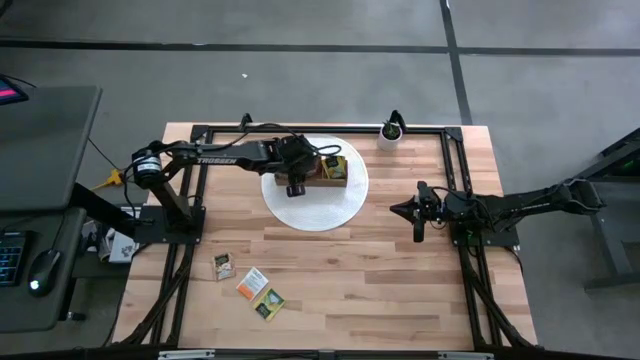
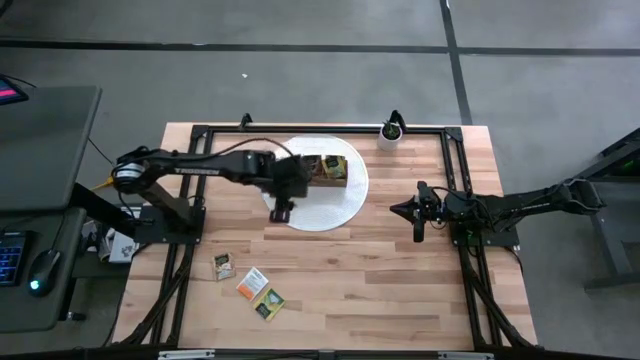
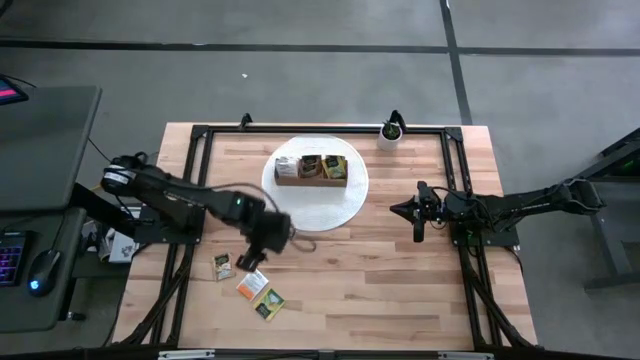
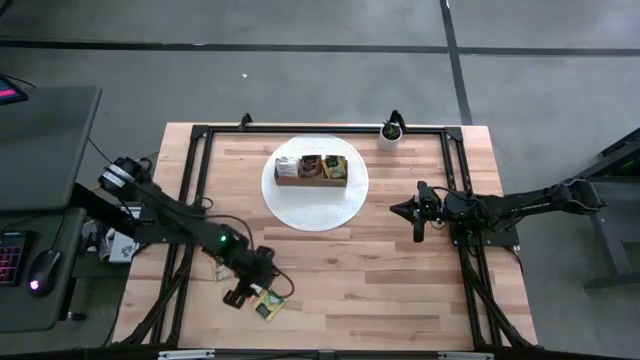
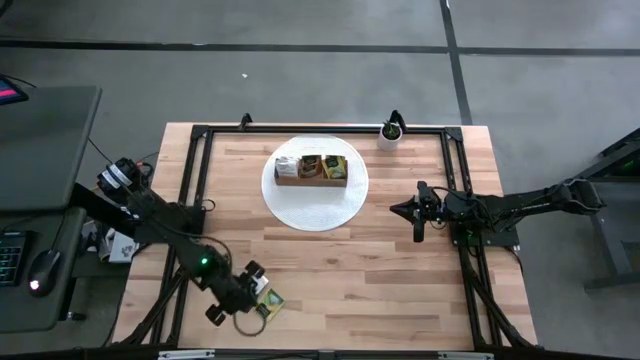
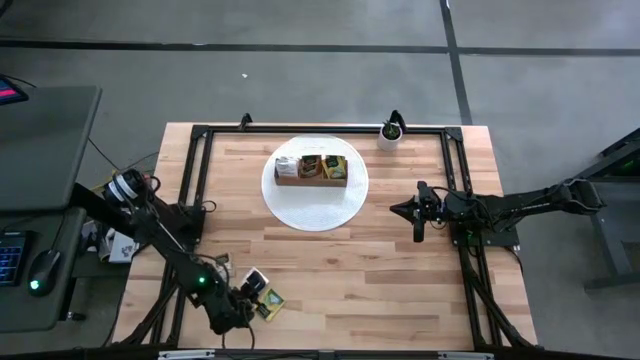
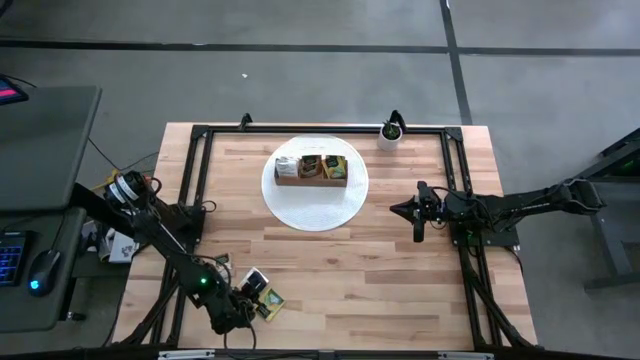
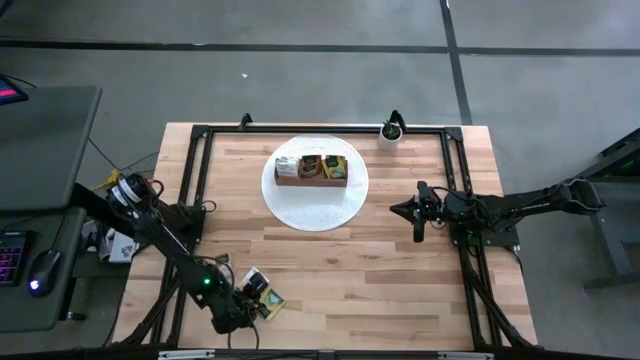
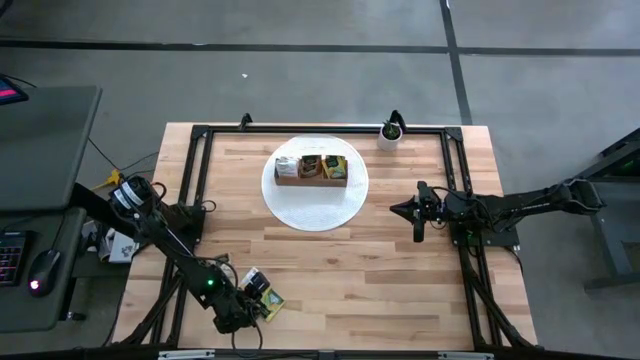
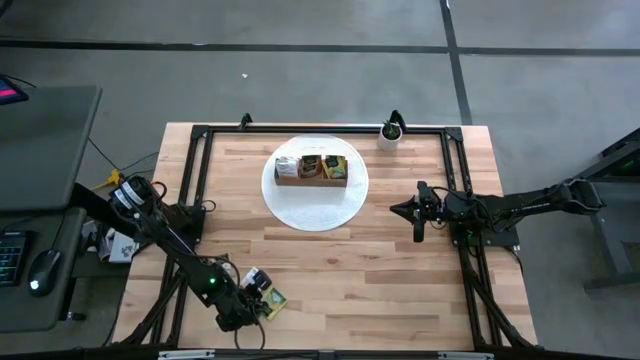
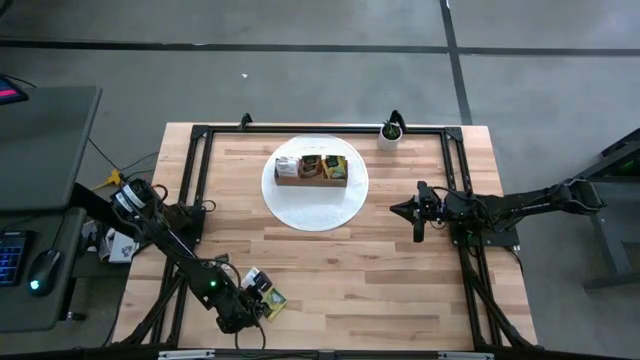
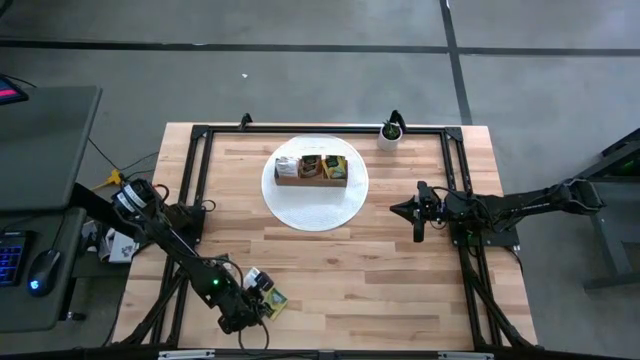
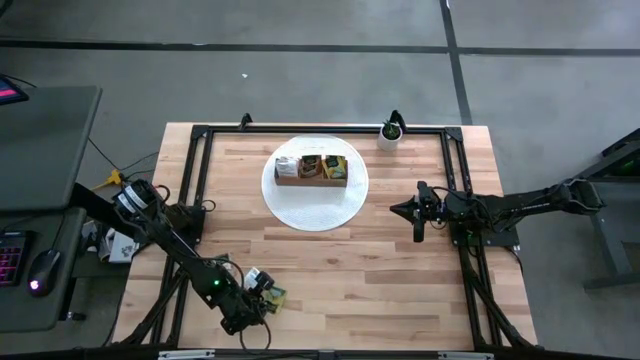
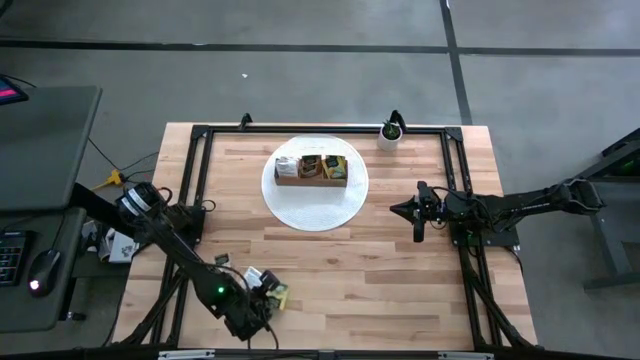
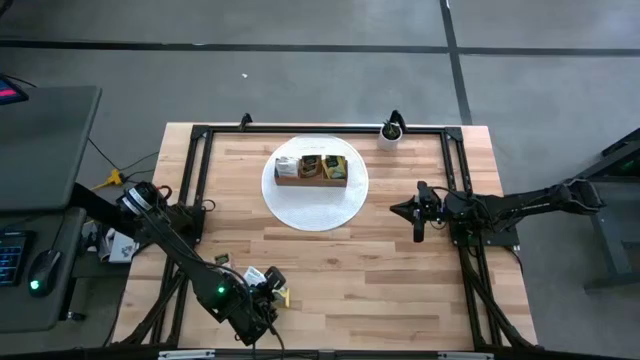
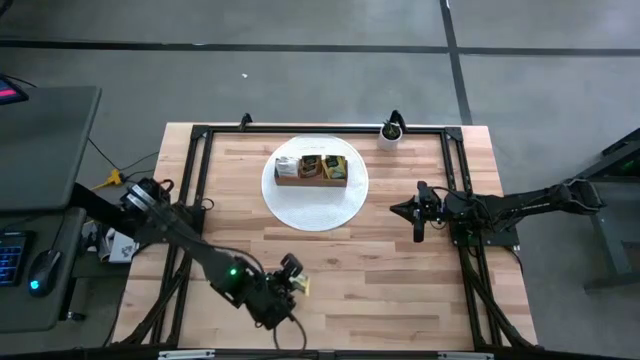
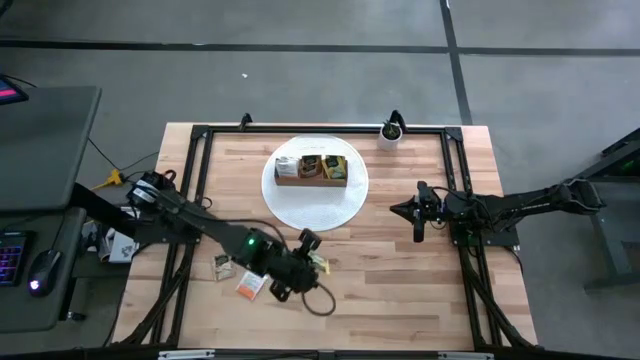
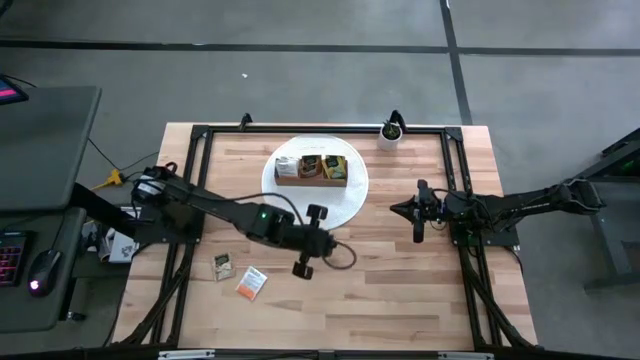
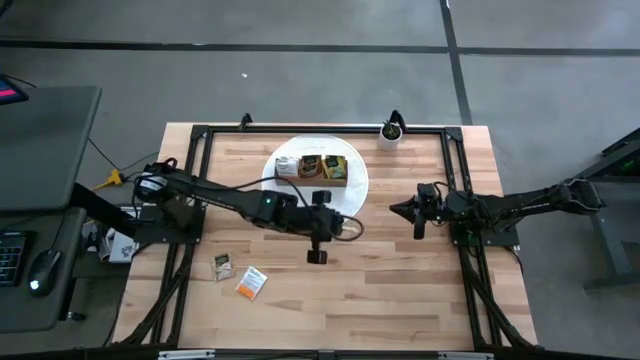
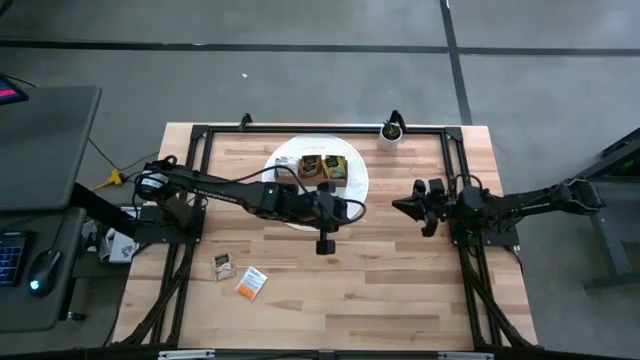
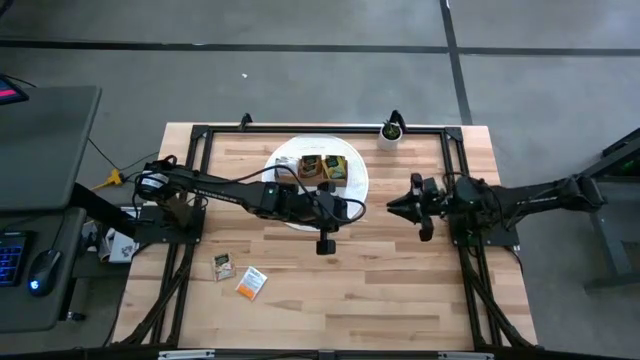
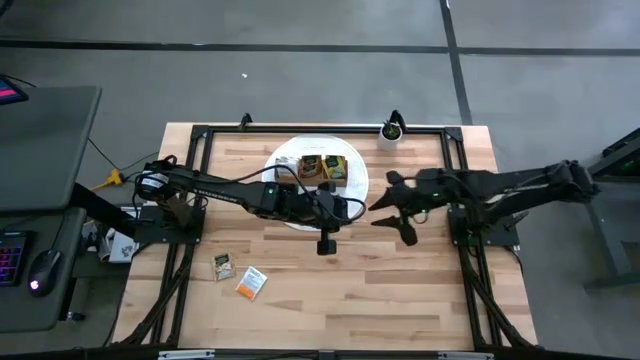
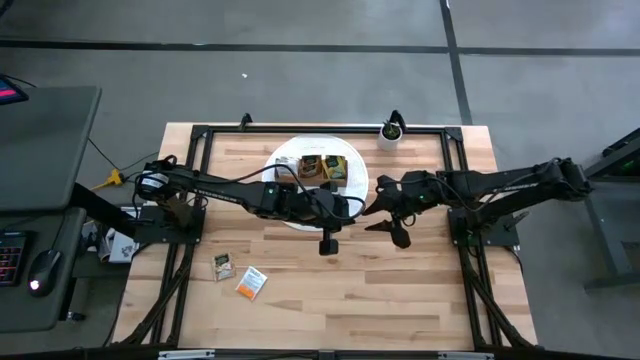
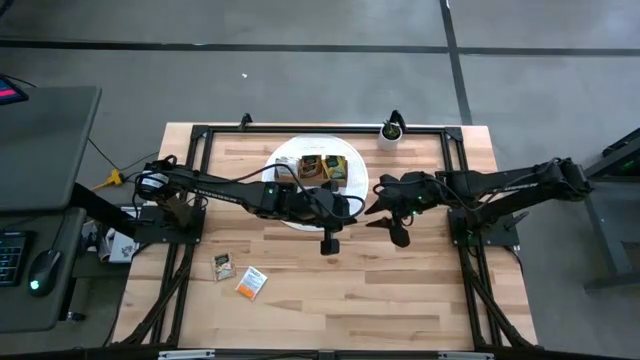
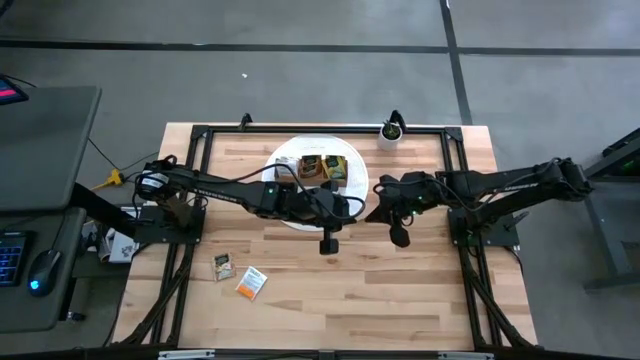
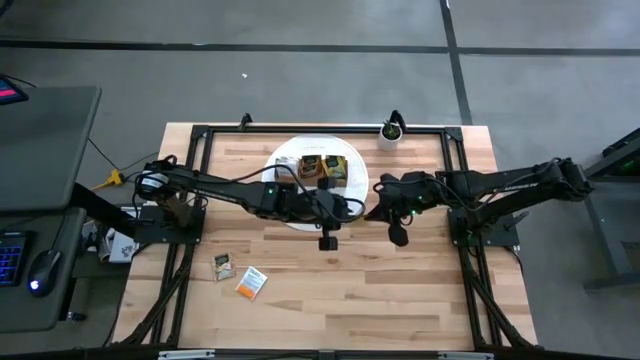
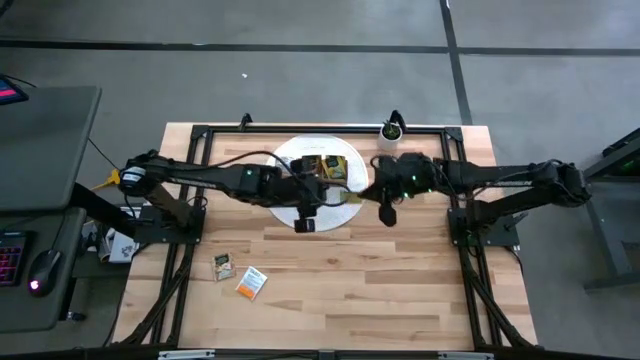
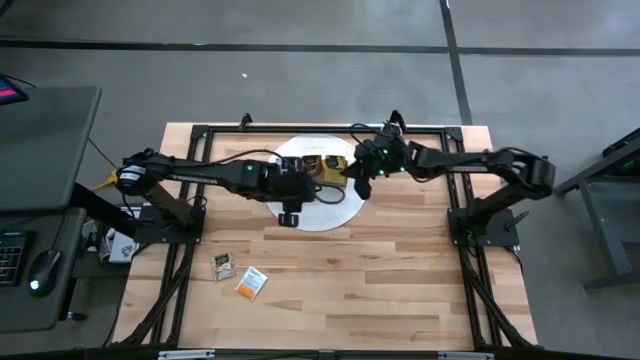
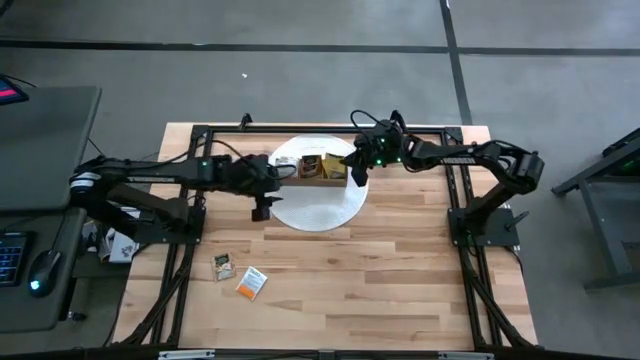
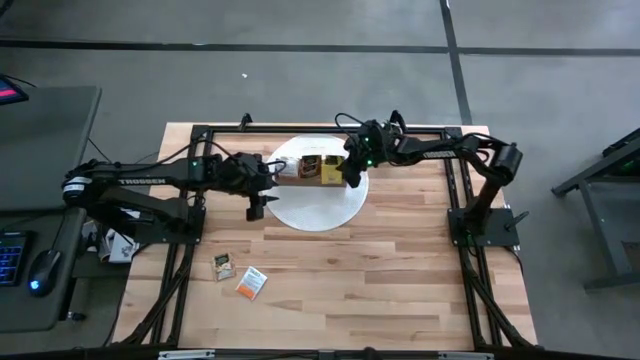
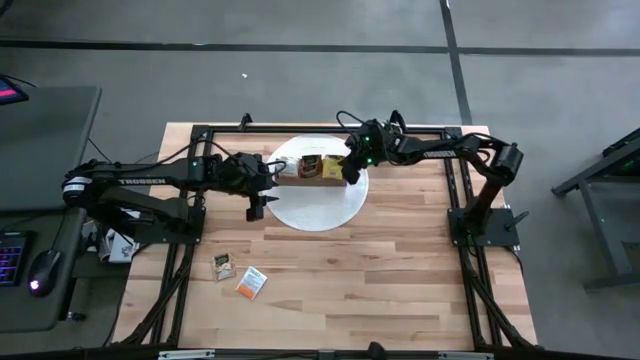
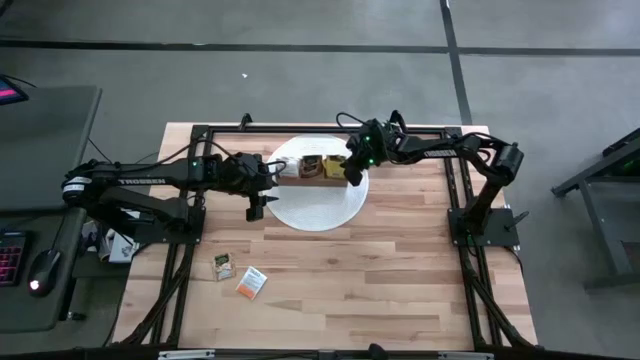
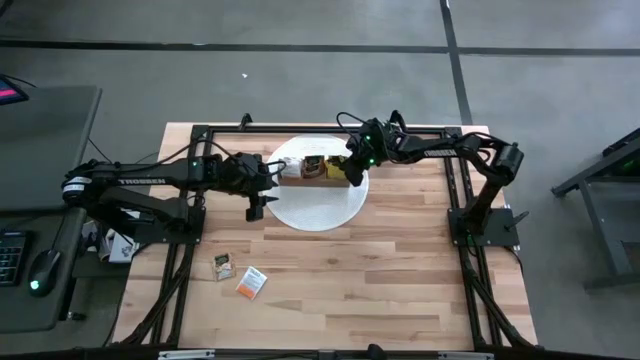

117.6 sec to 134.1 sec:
Task: Pick & Place Tea
Put the green tea bag into the right section of the wooden organizer

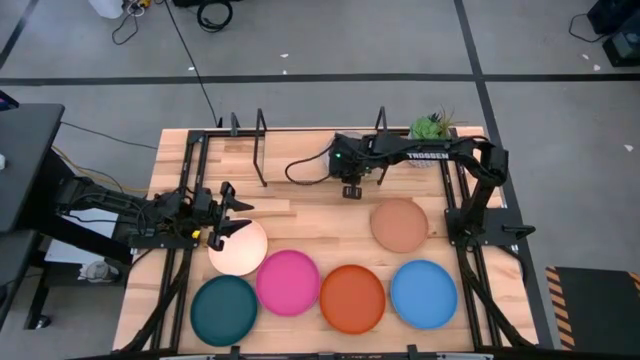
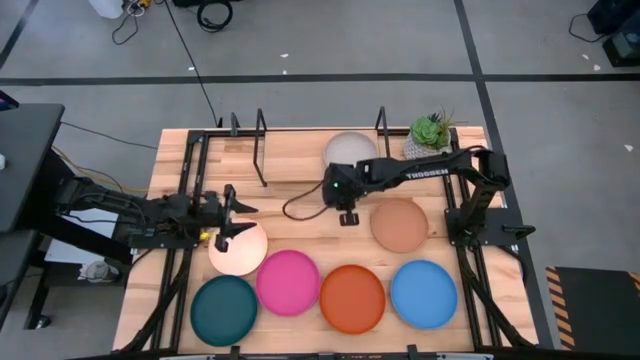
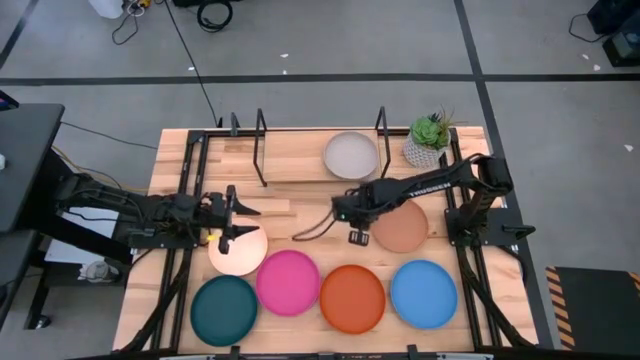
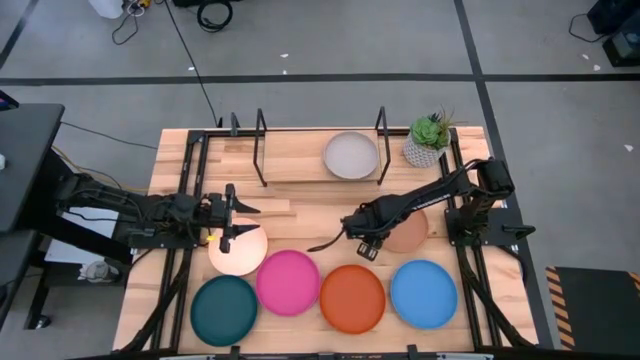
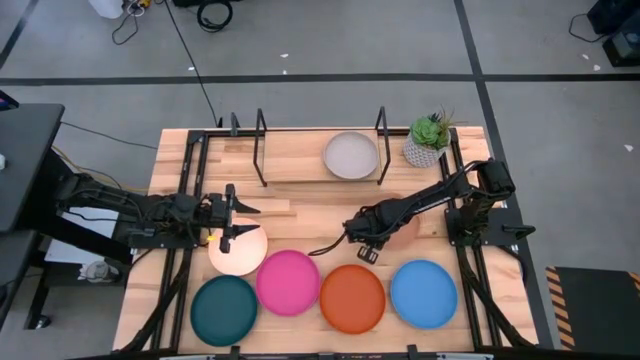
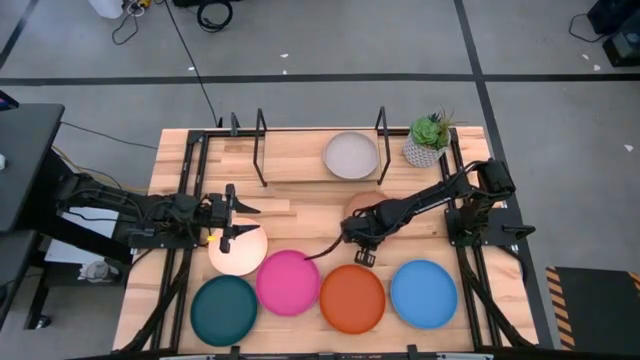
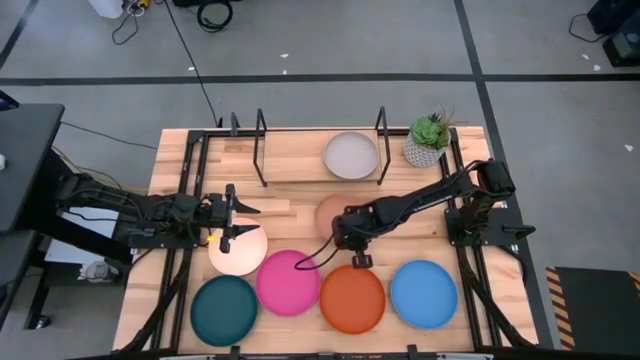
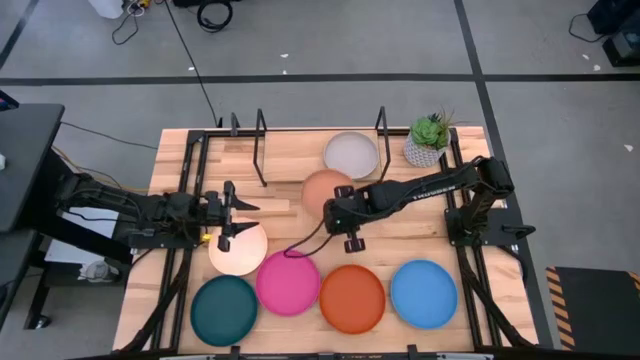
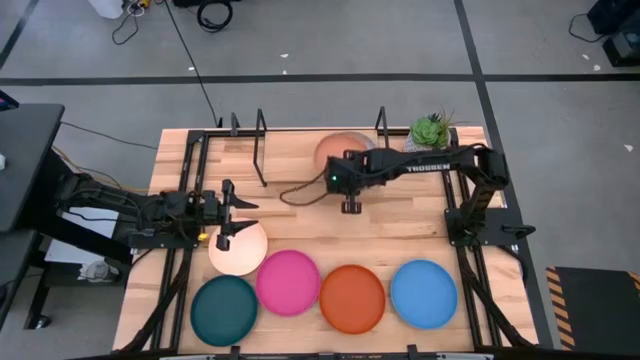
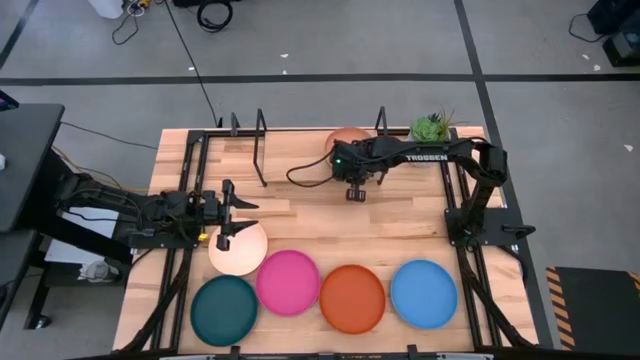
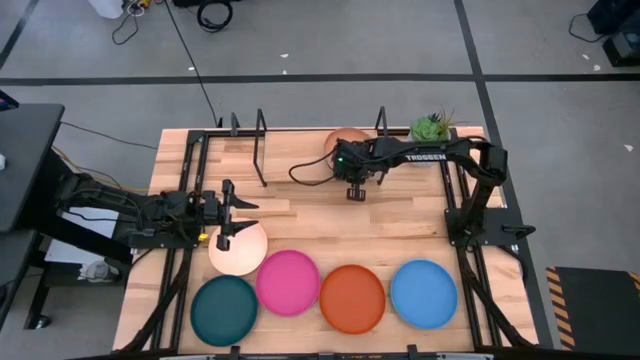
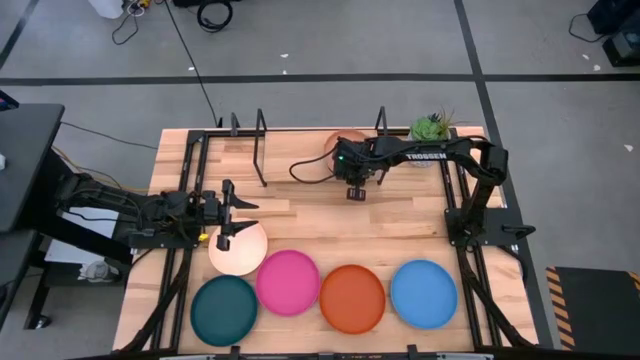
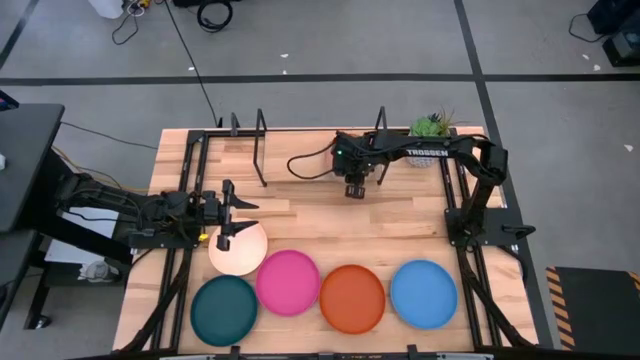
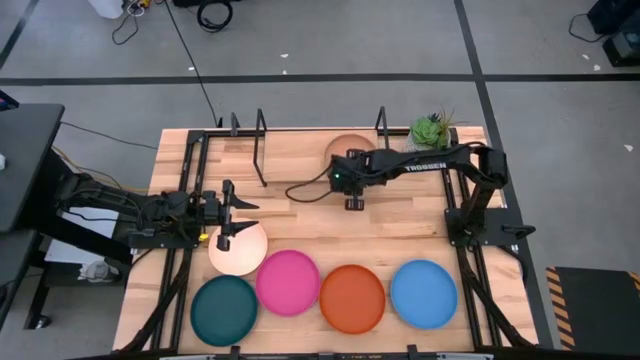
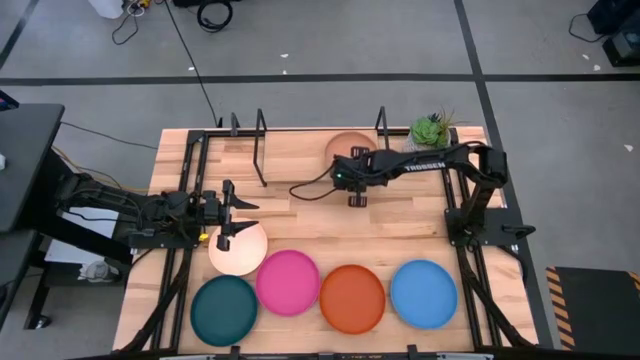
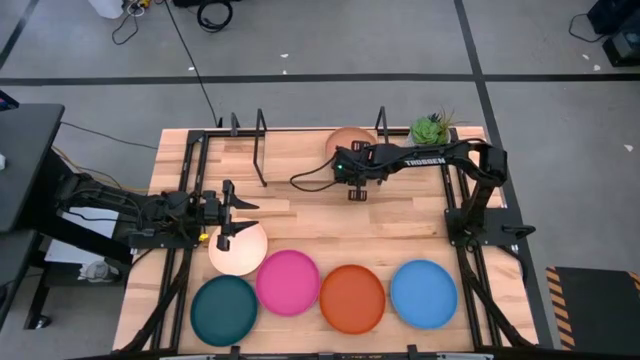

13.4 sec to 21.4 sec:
Task: Place and stack plates onto a shelf
Stack the brown plate on top of the gray plate on the shelf
